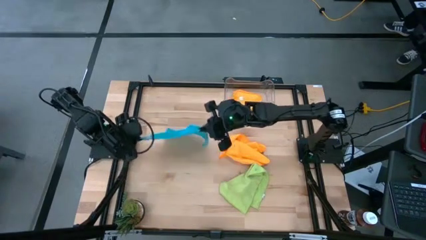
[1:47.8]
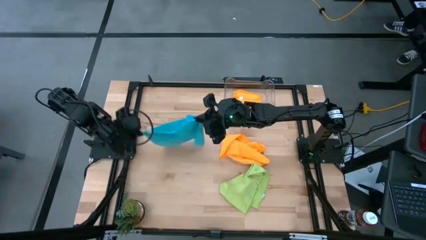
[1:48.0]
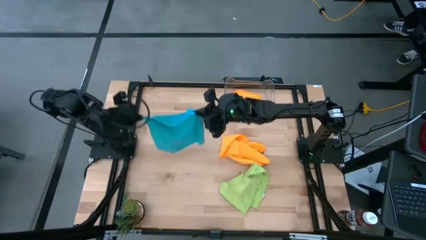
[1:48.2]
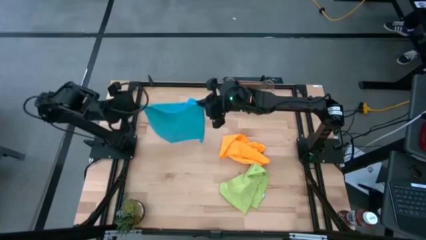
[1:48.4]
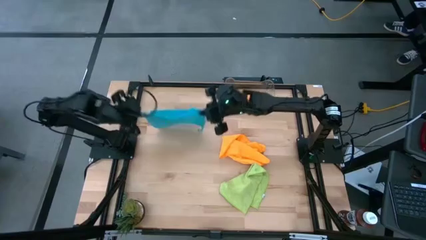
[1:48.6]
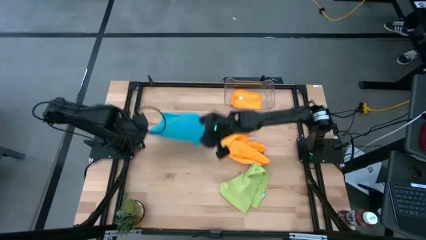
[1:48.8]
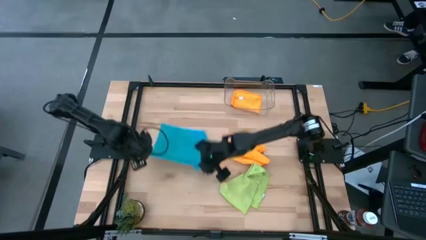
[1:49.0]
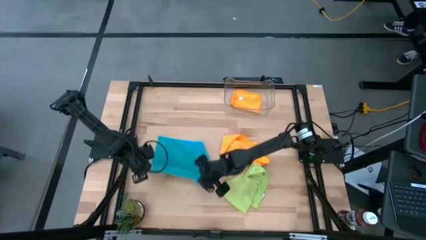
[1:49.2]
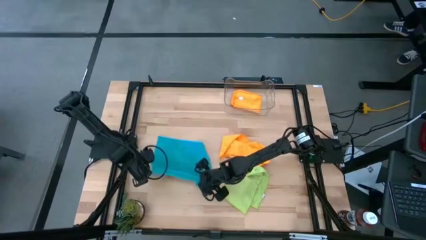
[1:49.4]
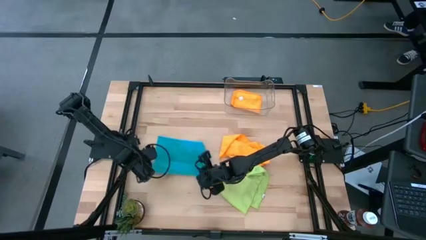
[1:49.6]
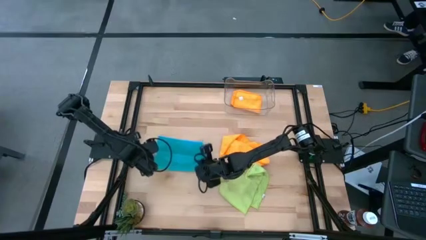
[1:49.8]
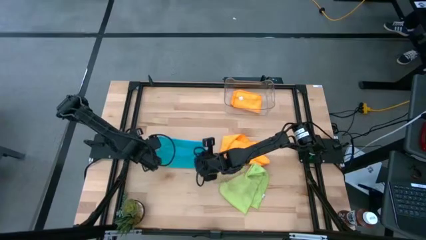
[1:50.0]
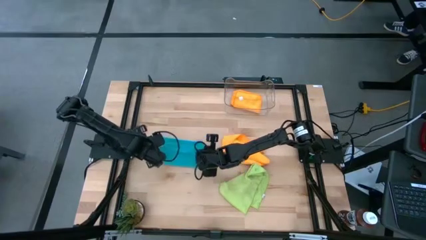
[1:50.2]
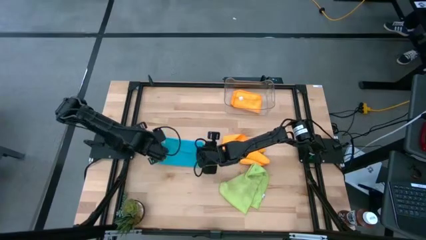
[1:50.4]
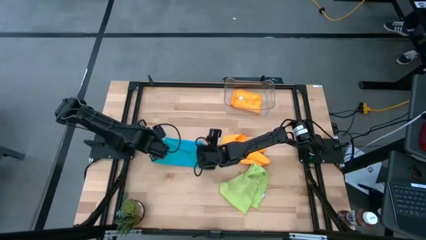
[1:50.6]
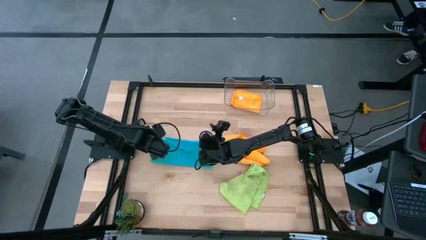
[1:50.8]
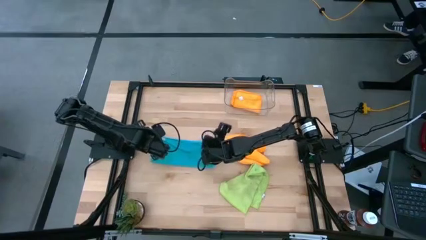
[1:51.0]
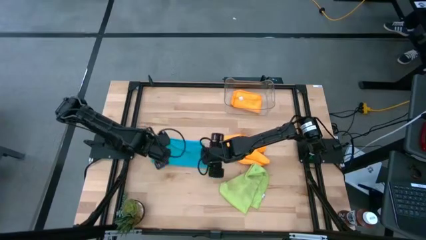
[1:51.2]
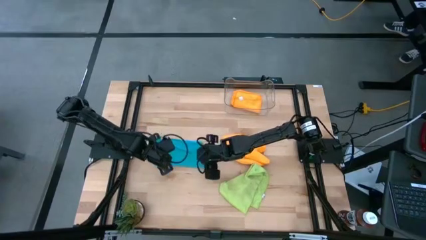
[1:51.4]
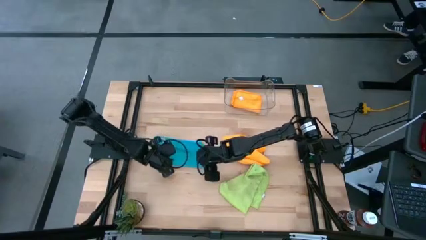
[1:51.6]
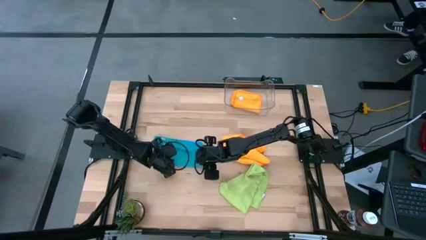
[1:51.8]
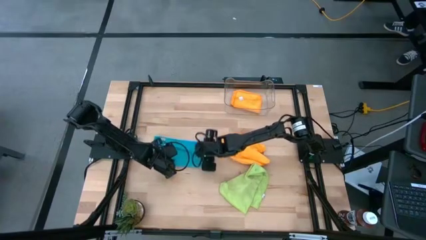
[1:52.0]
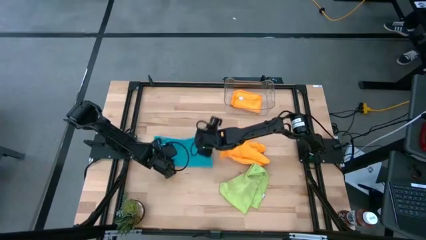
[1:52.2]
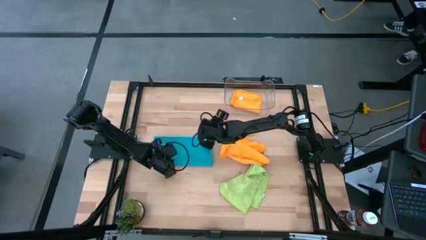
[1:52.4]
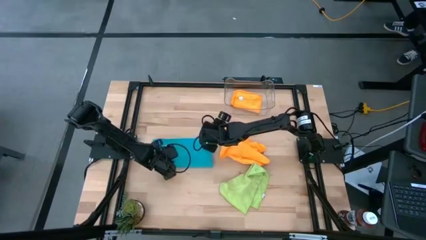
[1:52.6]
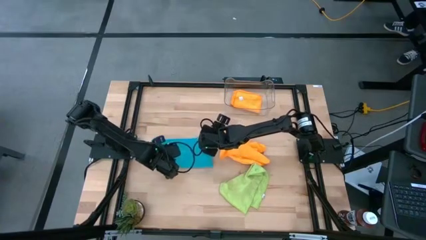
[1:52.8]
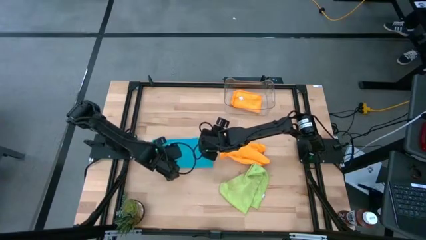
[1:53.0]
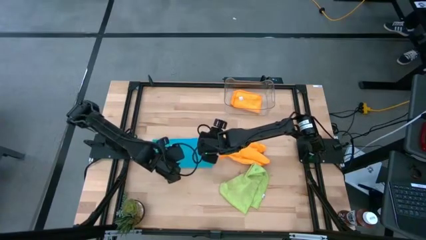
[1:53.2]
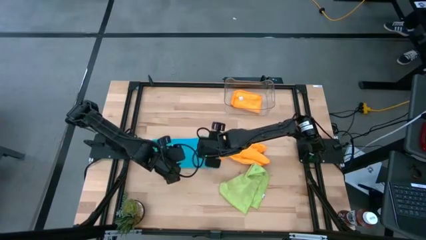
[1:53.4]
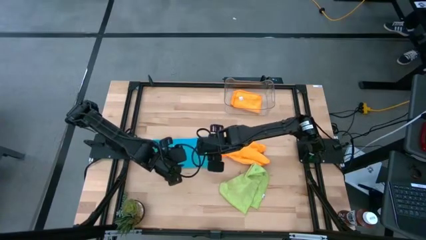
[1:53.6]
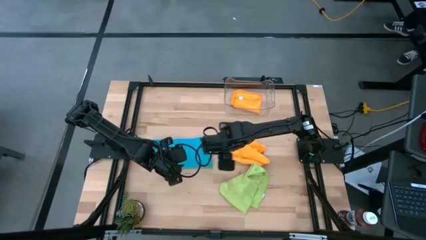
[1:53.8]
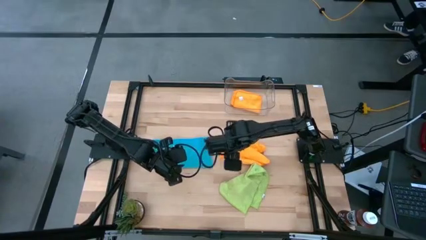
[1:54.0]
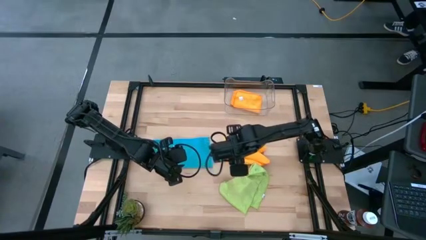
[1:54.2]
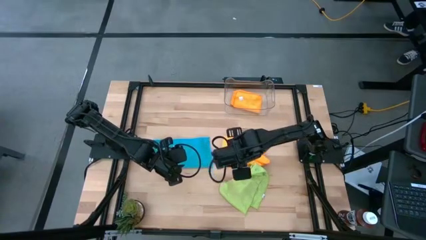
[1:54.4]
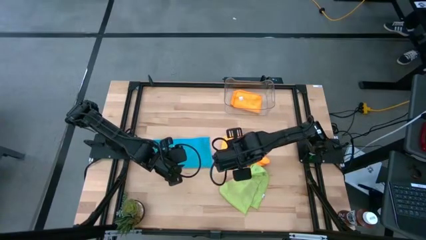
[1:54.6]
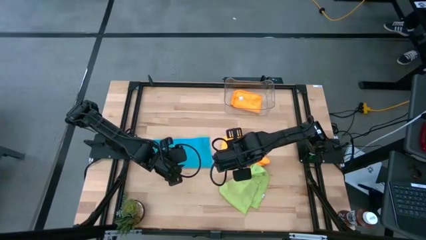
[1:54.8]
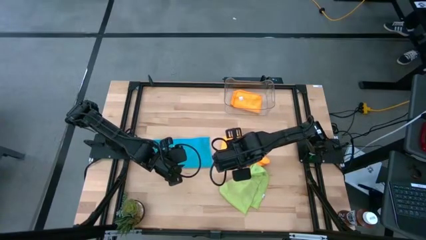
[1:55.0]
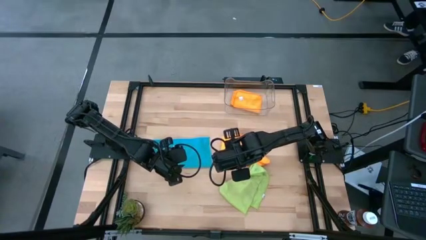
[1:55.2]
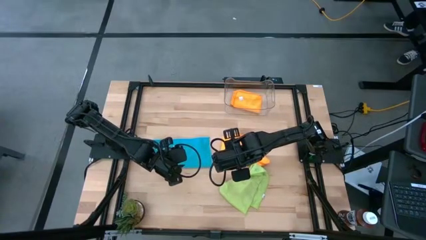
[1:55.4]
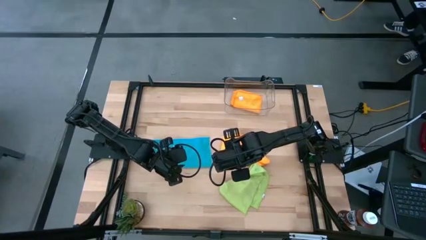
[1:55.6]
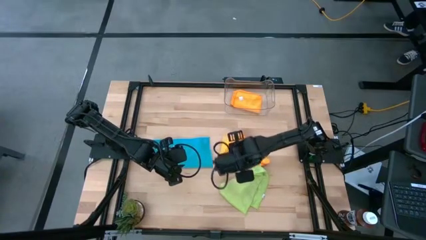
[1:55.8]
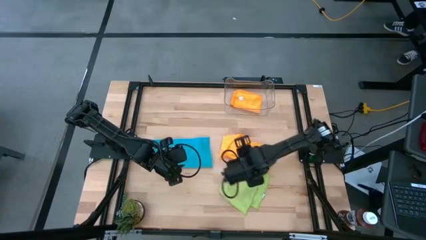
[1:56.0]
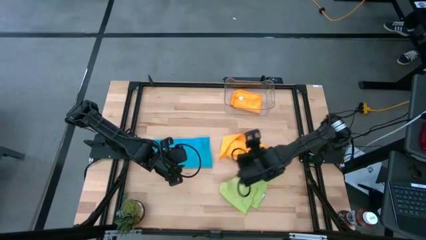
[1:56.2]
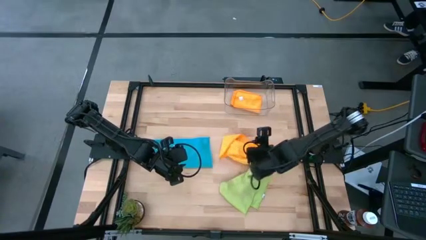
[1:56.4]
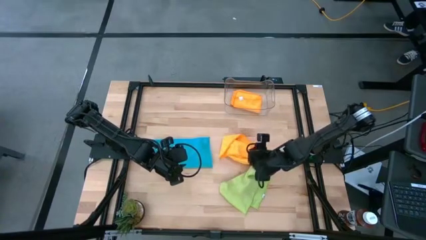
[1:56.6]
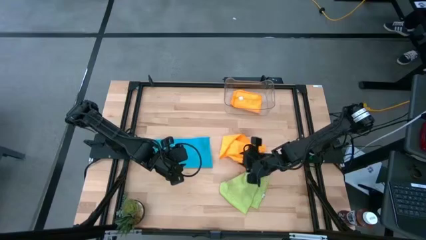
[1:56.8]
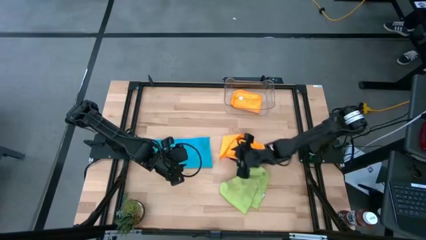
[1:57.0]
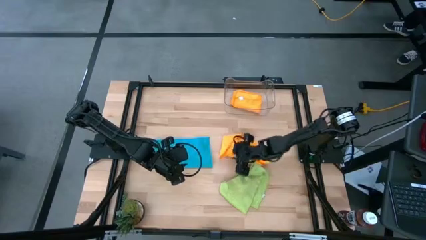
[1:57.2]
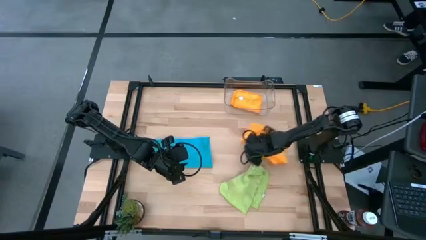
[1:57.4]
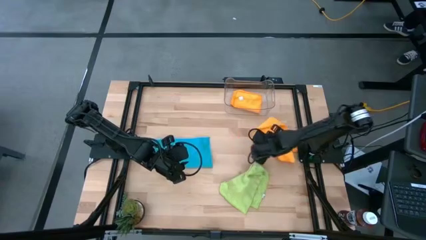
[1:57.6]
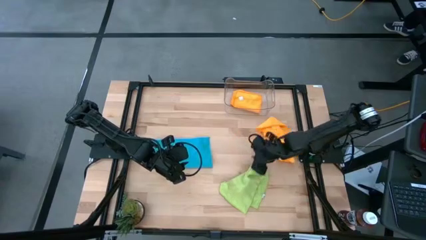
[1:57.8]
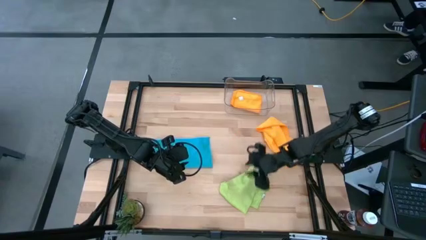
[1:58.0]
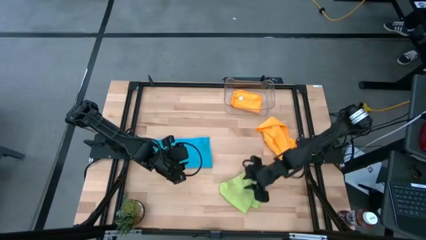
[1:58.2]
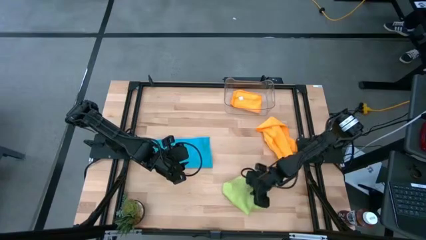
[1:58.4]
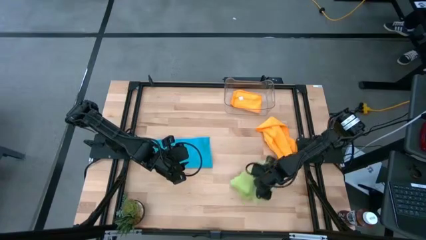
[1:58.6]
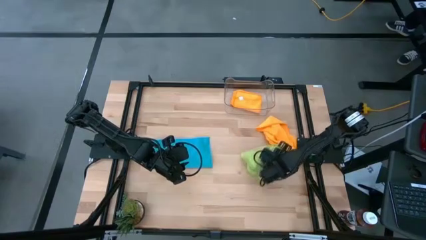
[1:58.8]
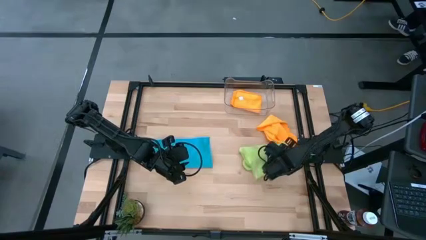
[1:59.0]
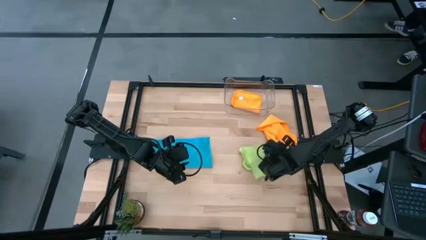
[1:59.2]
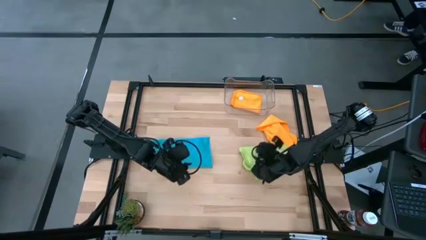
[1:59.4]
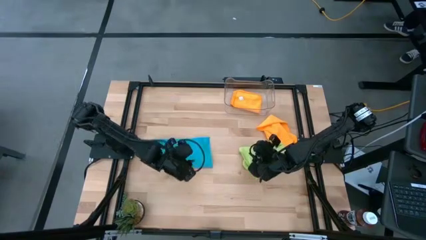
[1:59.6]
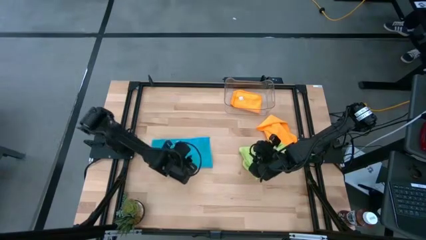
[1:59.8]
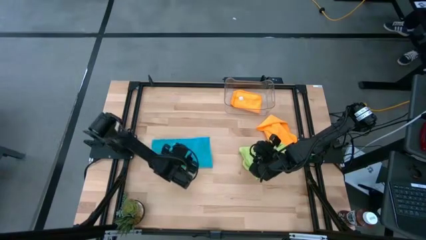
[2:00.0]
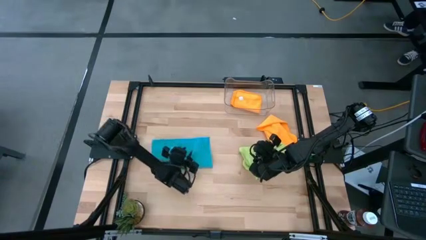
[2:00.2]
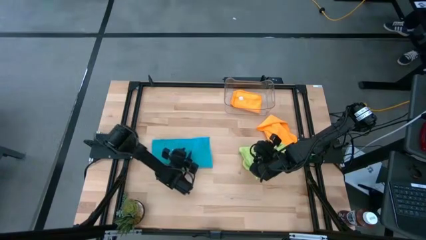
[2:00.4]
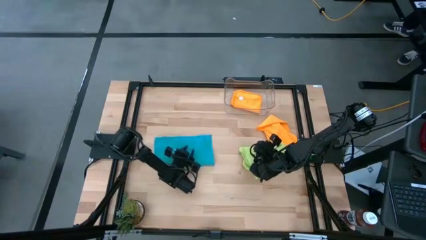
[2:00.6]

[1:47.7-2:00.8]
Task: Fold microfiber towels
Fold the blue microfiber cloth
